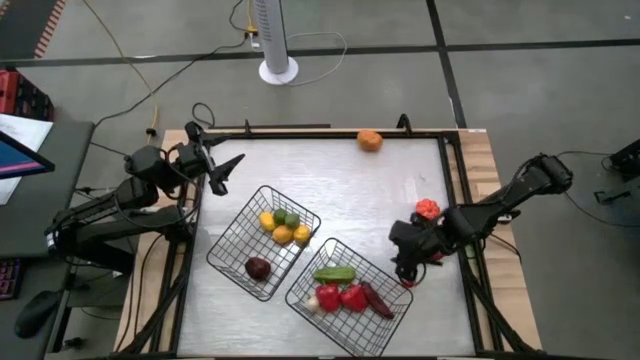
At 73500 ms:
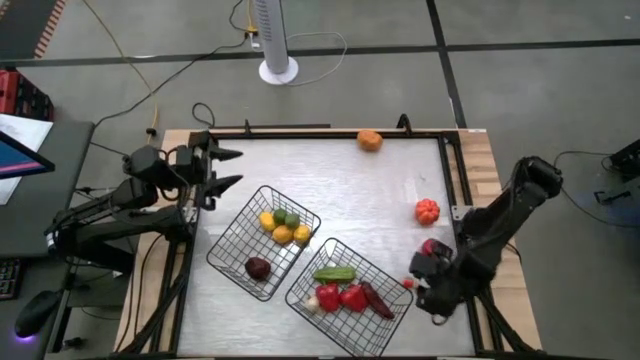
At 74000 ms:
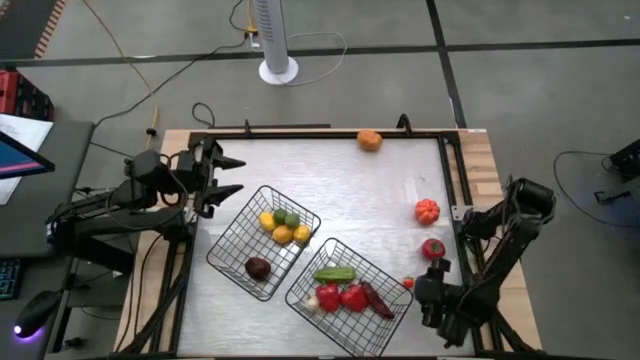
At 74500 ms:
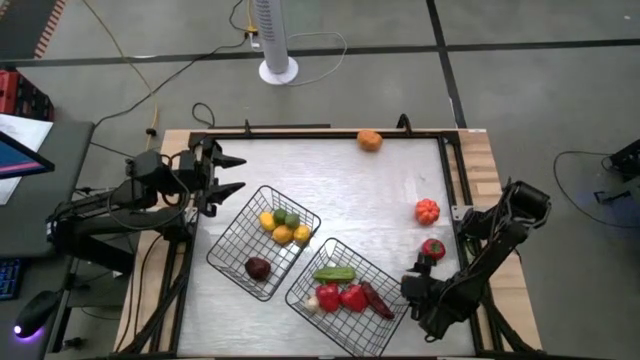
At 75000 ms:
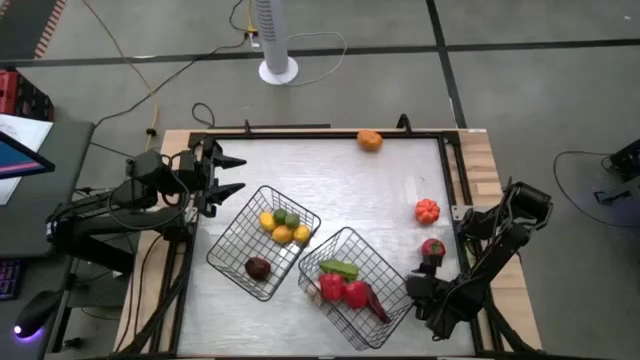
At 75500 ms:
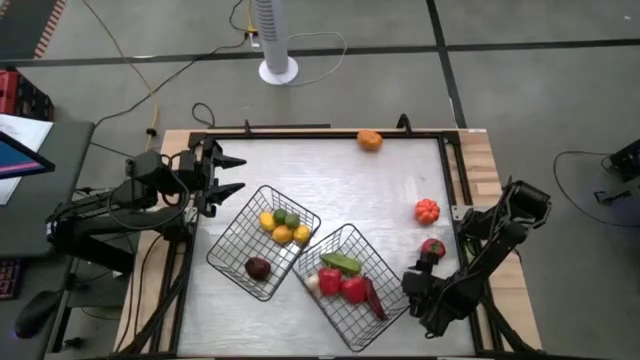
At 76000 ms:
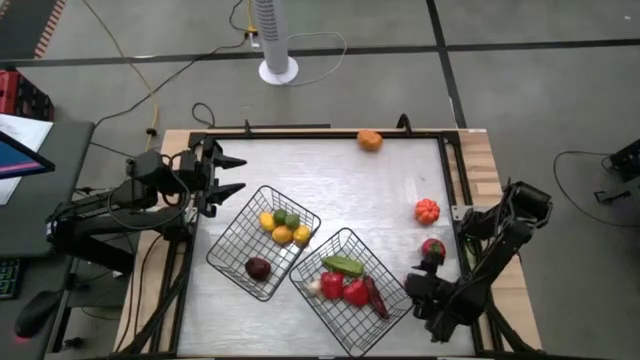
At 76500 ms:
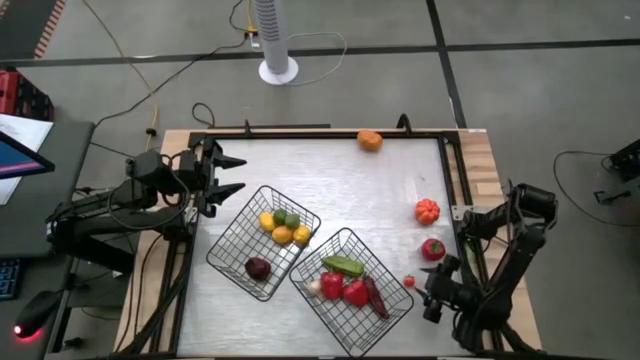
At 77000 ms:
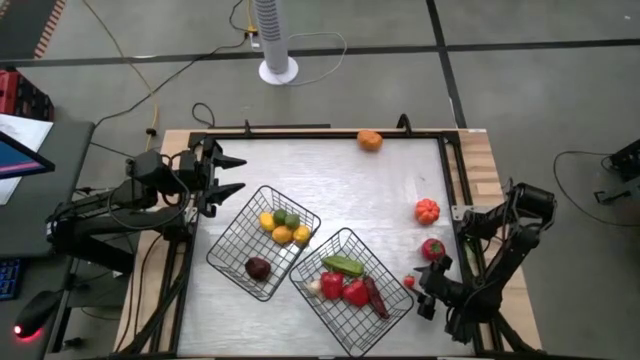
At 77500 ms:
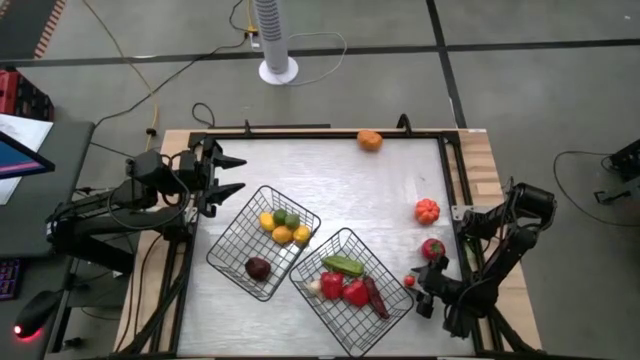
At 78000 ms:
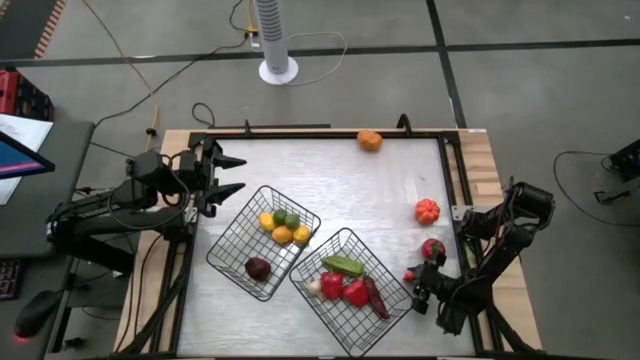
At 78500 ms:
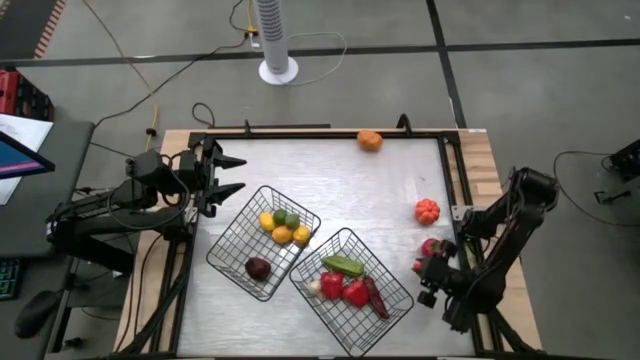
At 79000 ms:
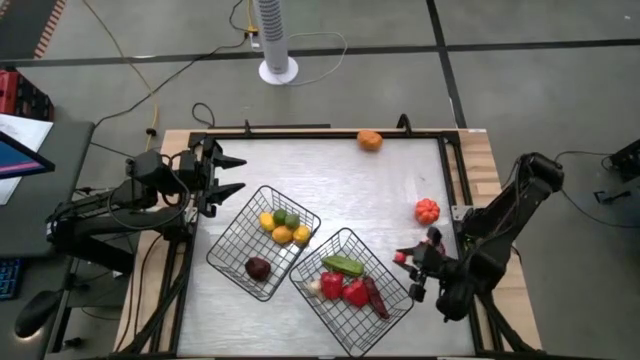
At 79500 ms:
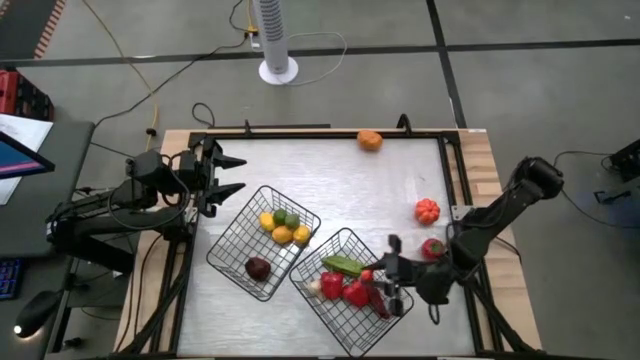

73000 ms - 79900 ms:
Task: Sort produce into baskets
Put the orange tomato into the right wire basket

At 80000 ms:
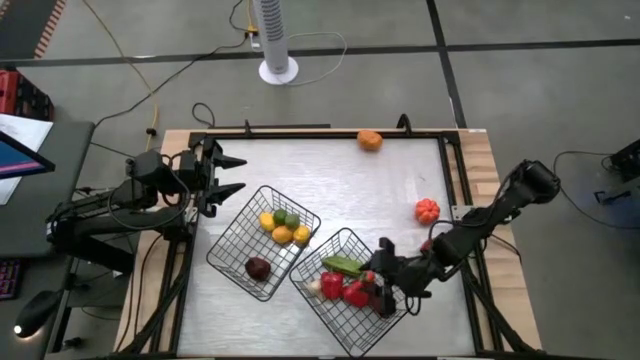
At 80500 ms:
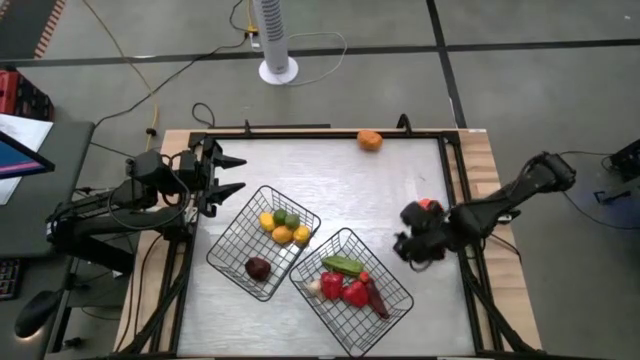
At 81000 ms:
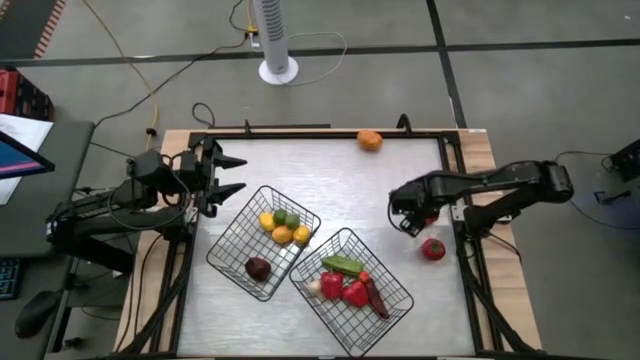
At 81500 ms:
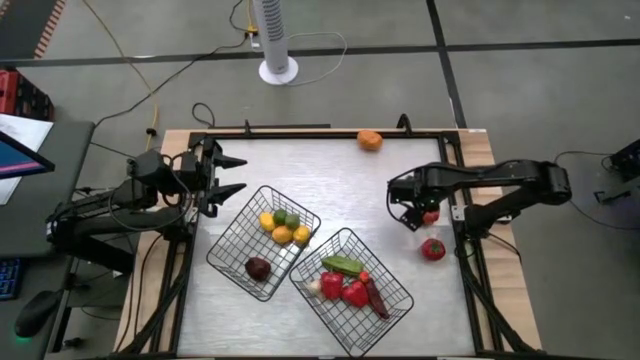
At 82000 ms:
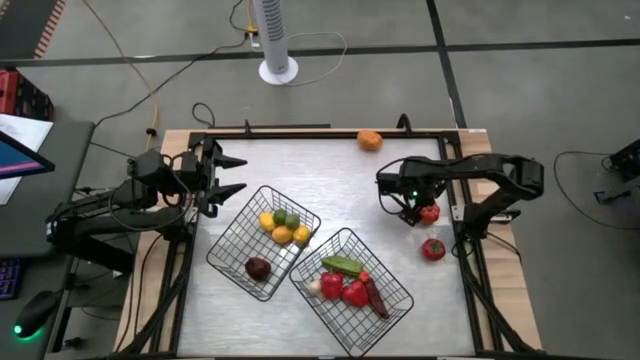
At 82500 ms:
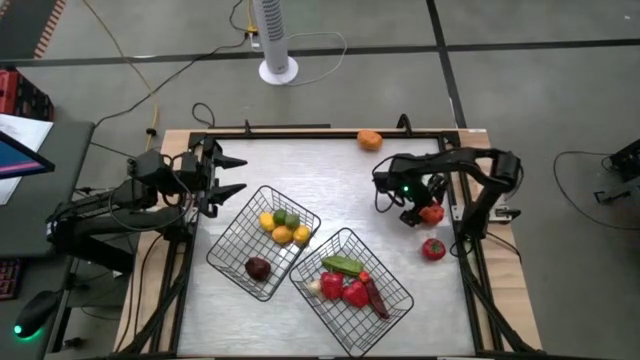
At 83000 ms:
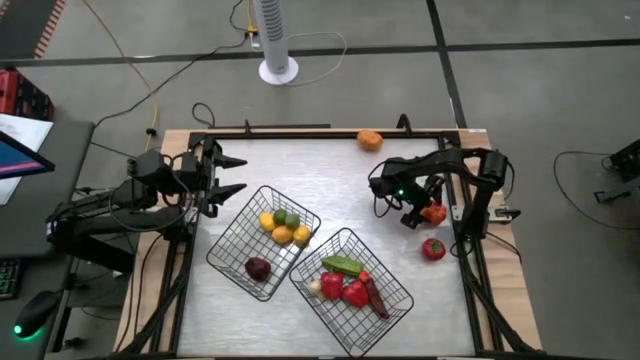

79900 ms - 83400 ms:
Put the pumpkin into the right wire basket

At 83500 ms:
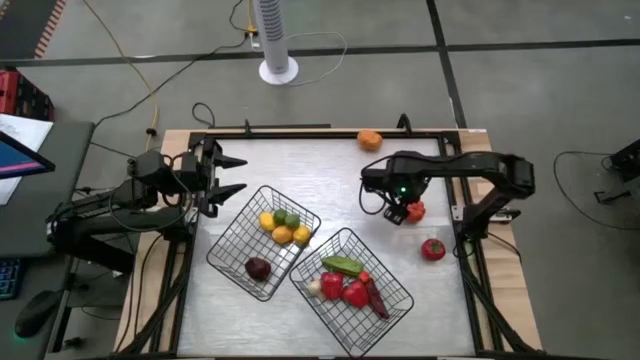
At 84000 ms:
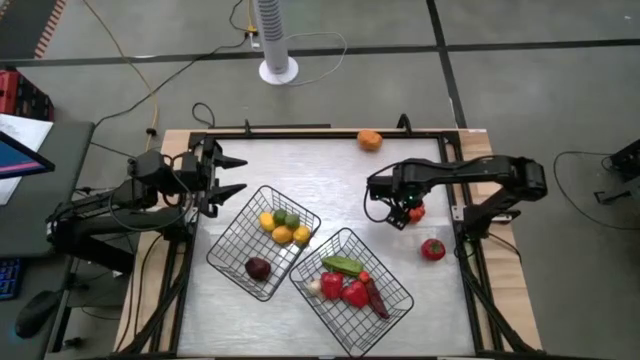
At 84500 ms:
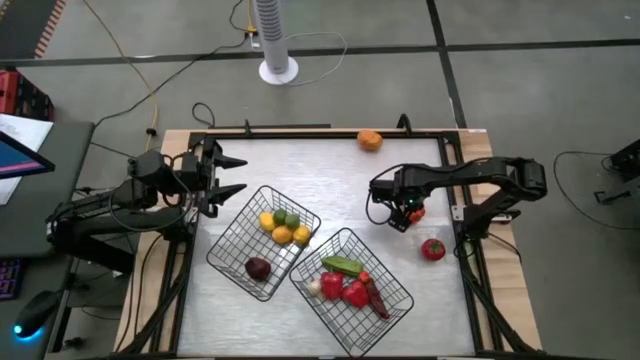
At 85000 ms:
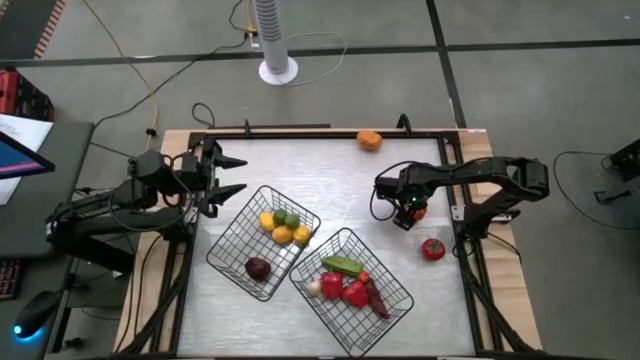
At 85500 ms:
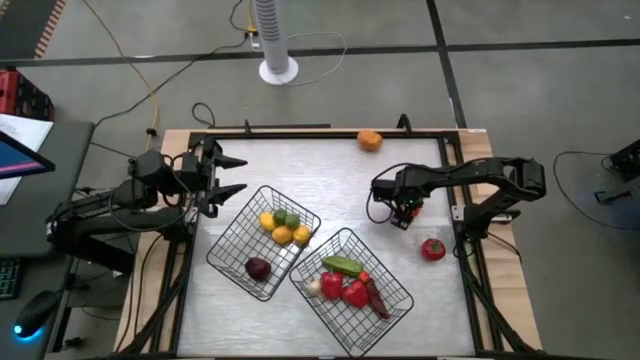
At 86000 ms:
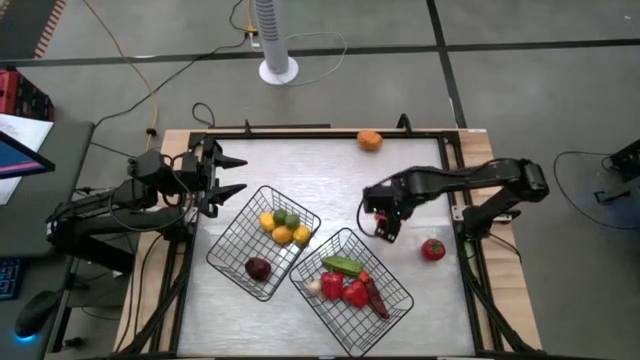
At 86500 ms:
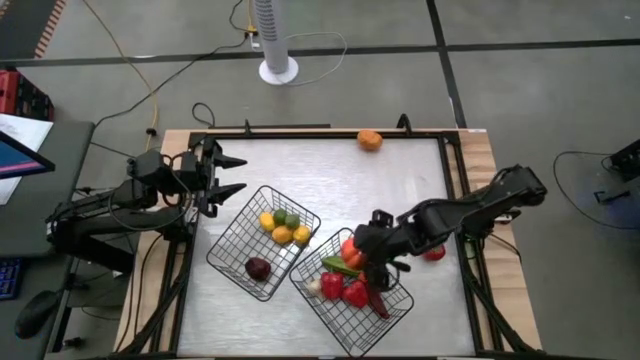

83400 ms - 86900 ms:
Put the pumpkin into the right wire basket

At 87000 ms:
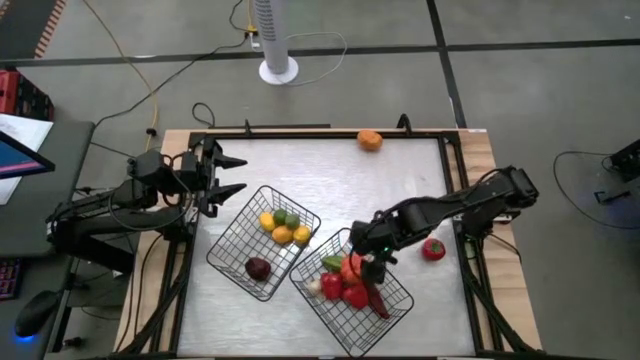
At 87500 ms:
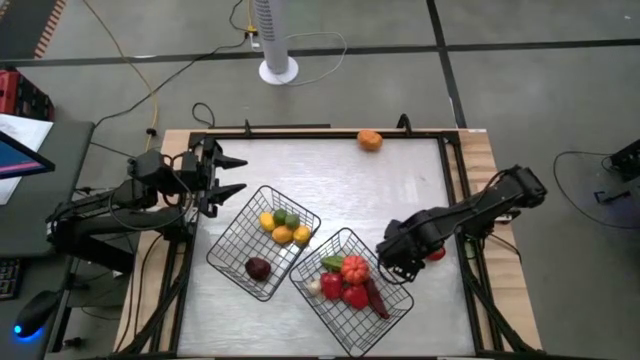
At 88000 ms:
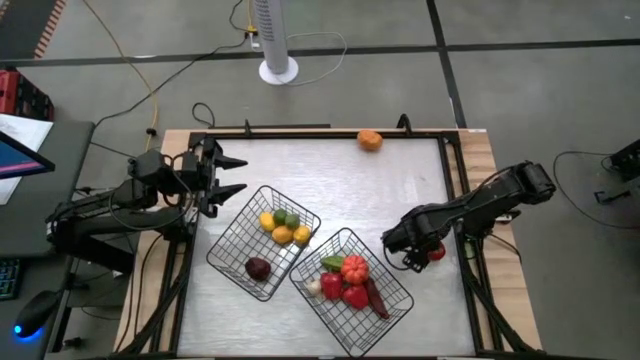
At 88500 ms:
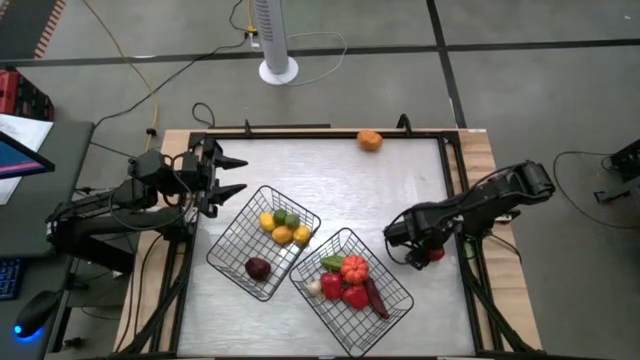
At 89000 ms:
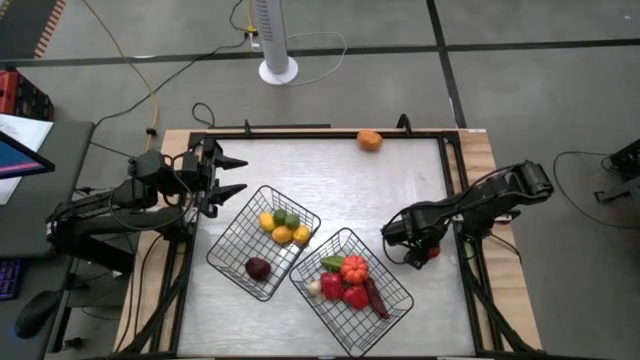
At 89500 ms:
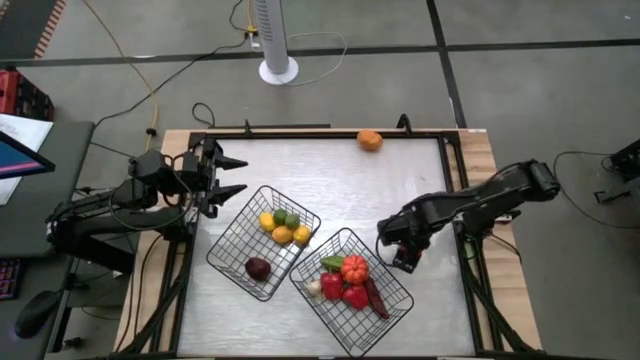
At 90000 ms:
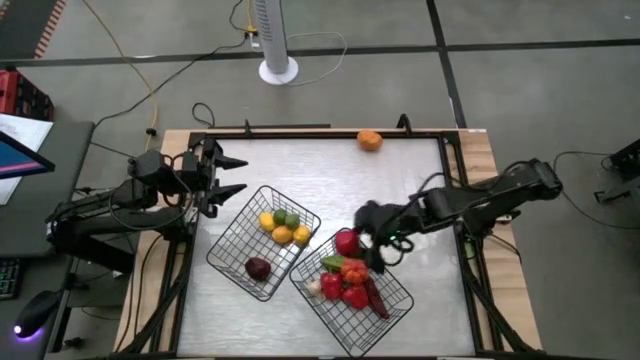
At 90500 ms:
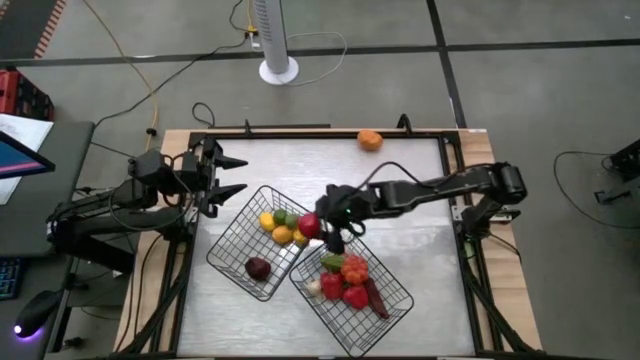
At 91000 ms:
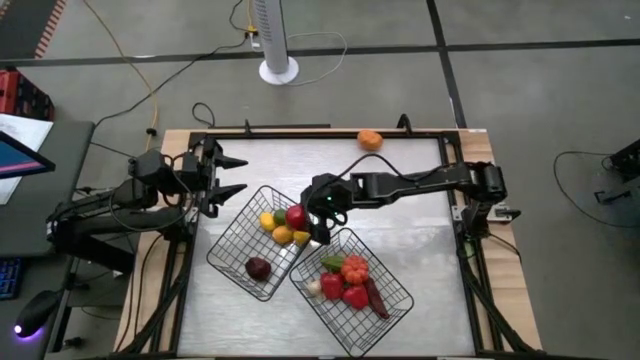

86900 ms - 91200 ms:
Put the red tomato into the left wire basket

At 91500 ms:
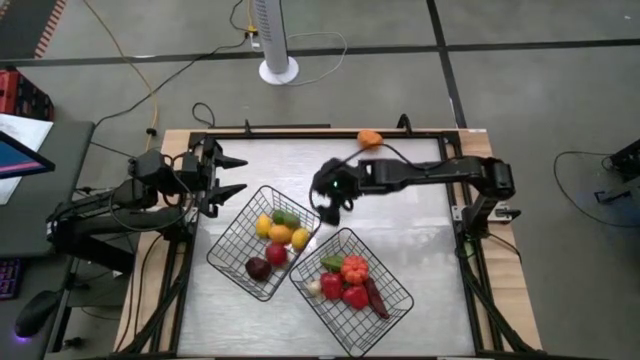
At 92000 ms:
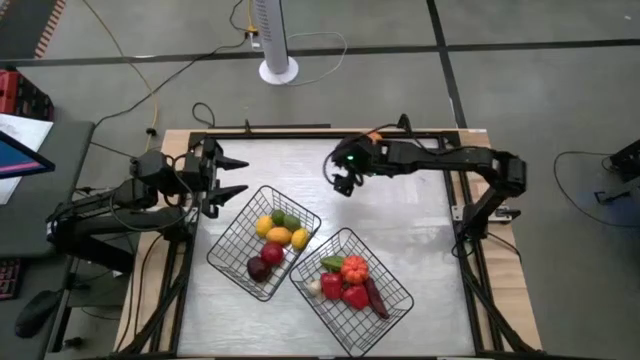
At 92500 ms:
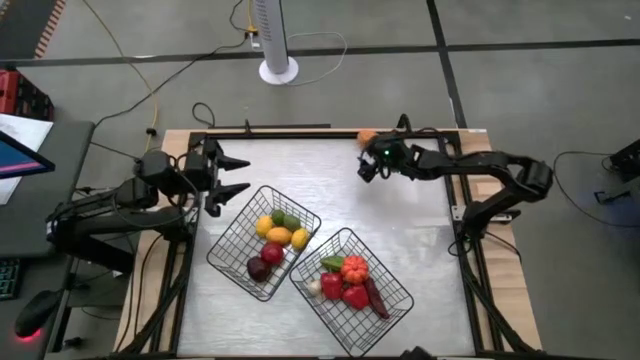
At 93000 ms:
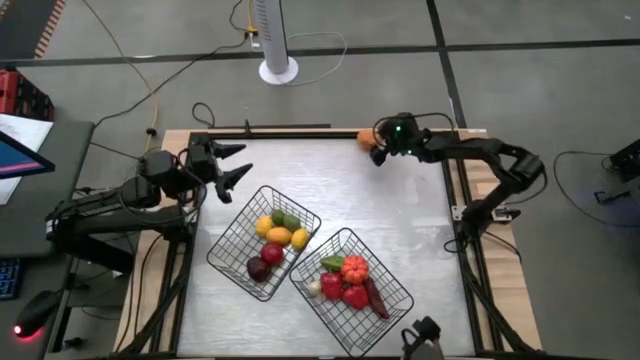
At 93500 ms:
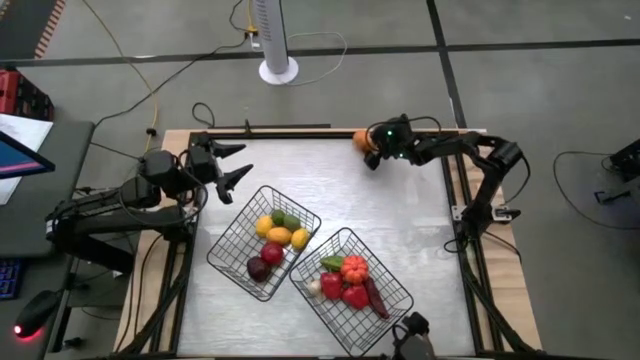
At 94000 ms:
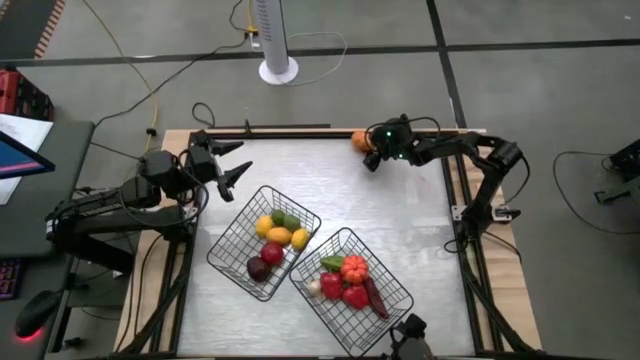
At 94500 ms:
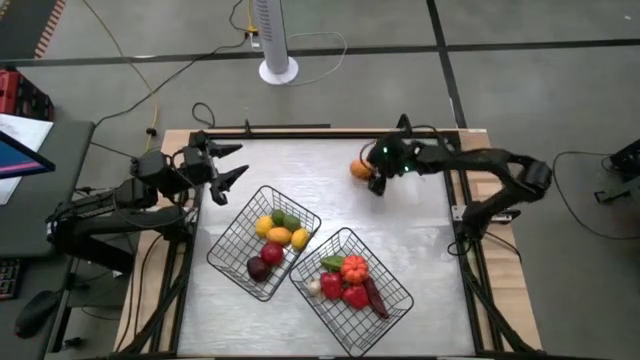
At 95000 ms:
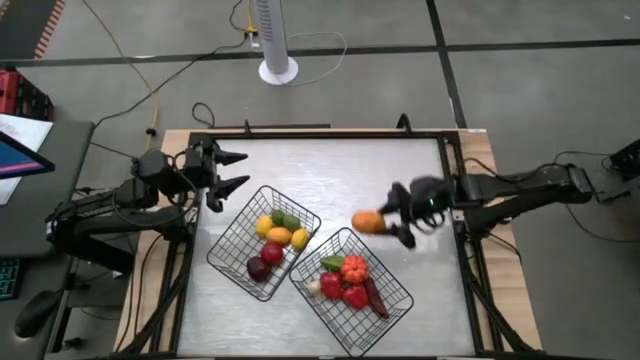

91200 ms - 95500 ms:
Put the potato into the right wire basket
